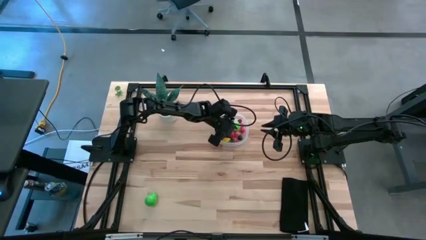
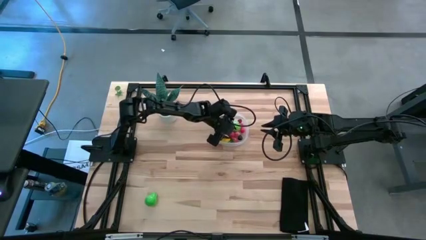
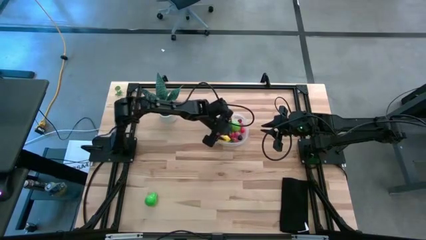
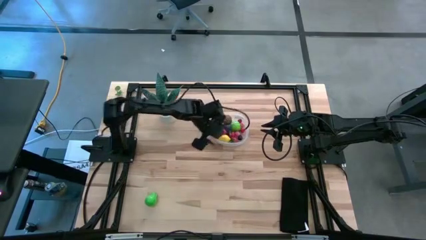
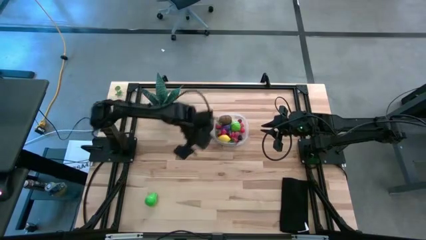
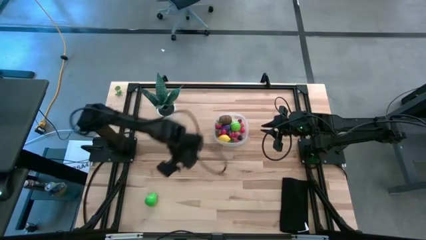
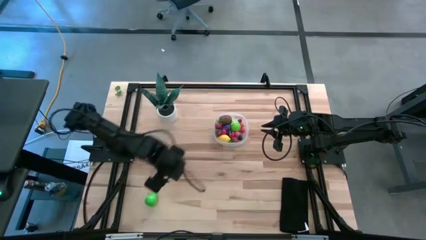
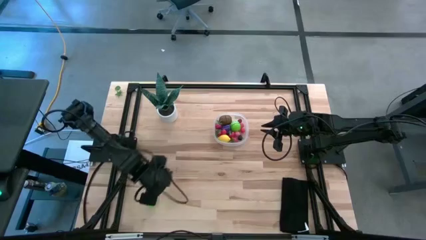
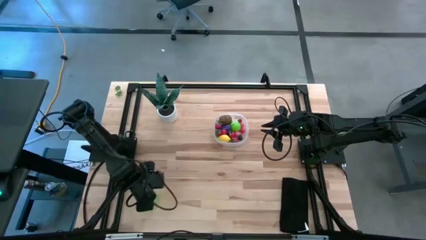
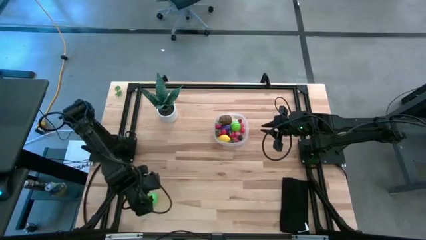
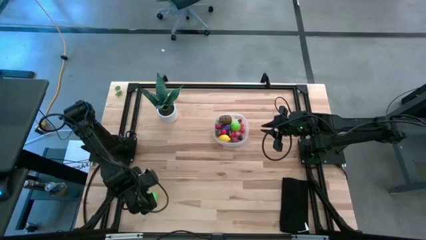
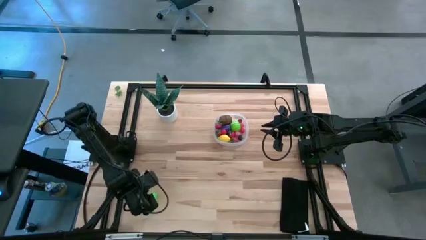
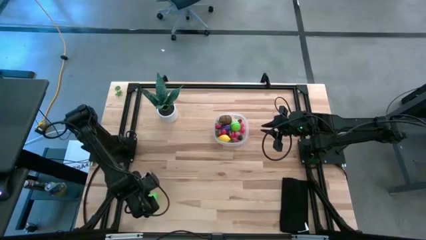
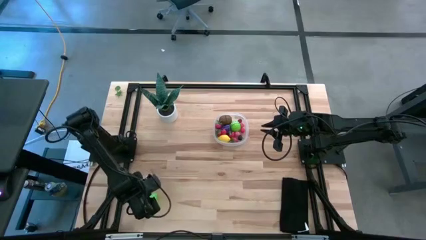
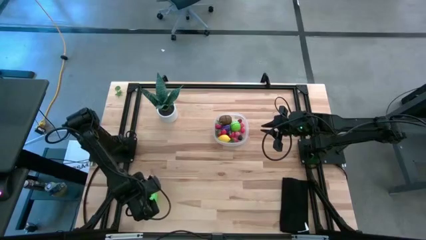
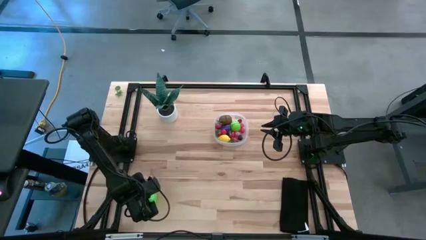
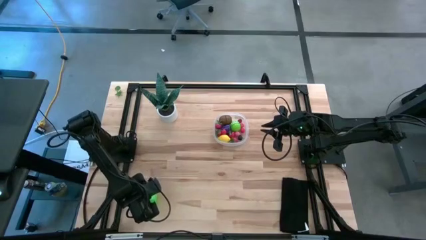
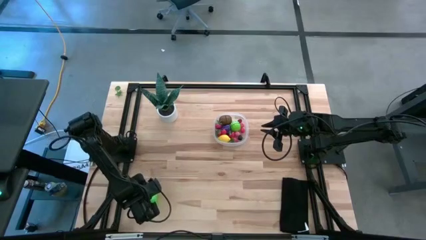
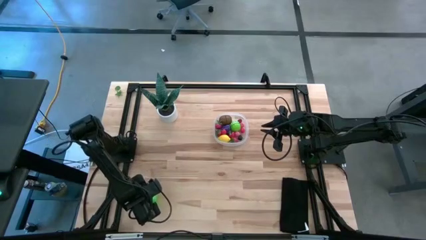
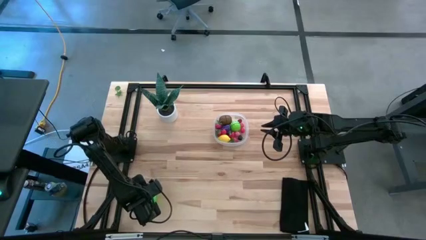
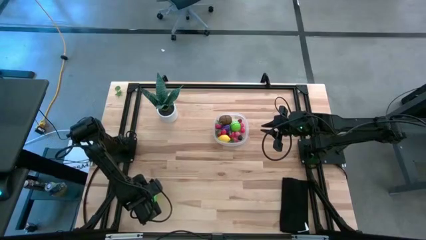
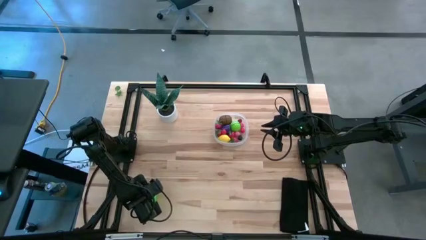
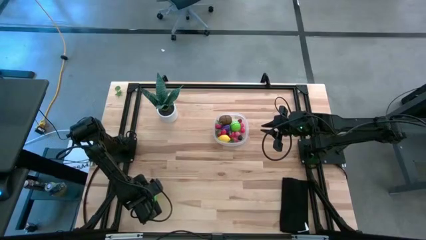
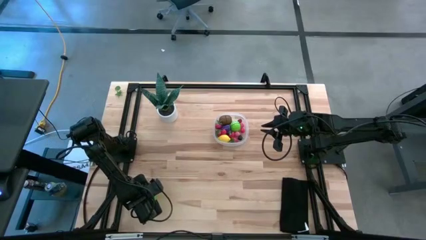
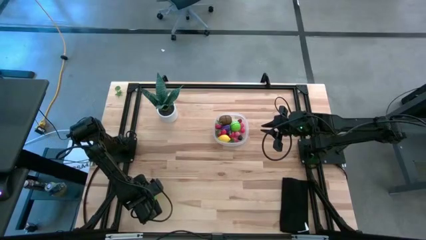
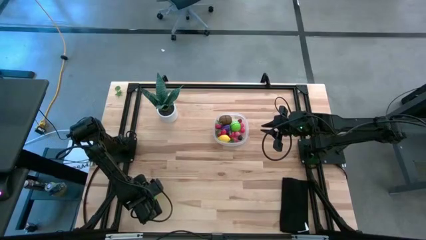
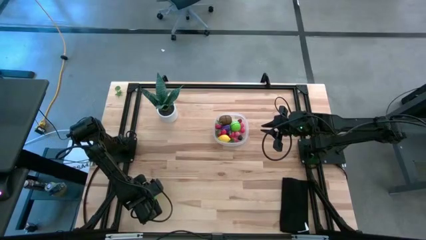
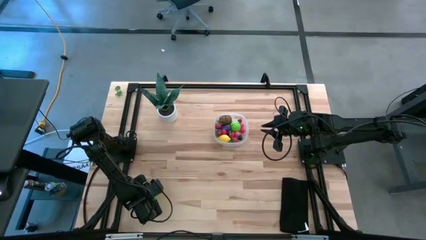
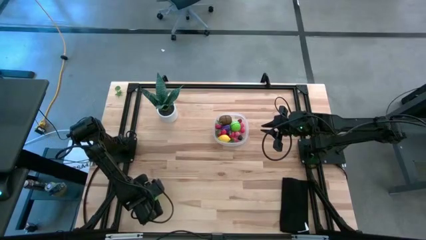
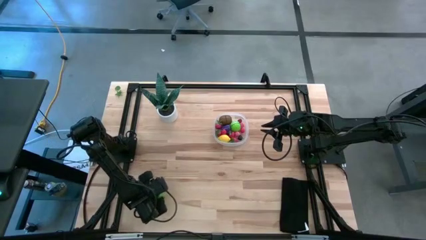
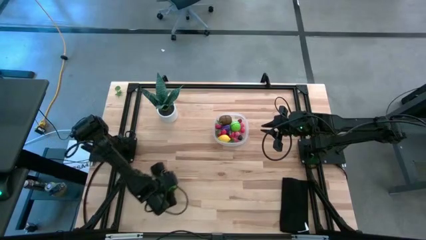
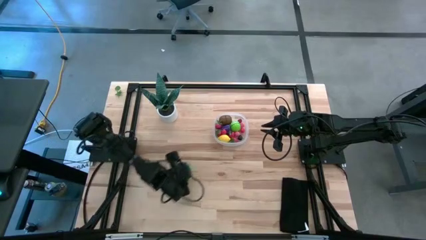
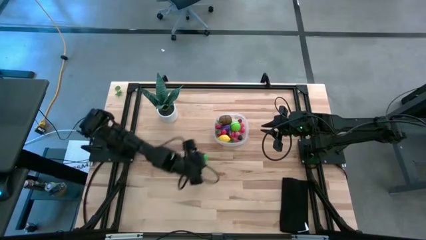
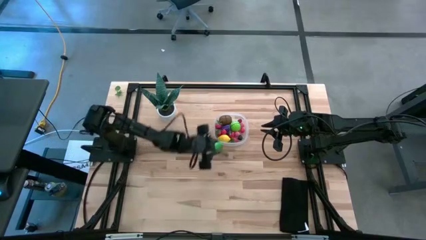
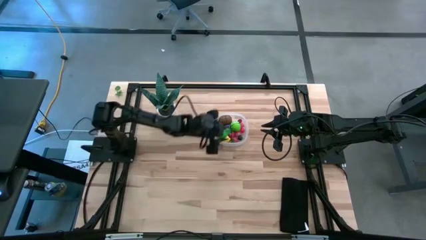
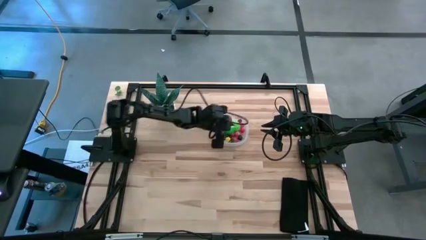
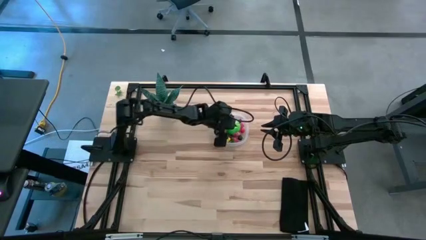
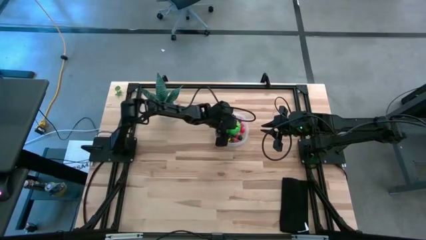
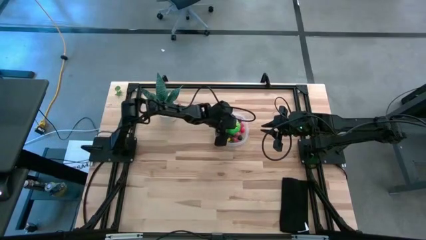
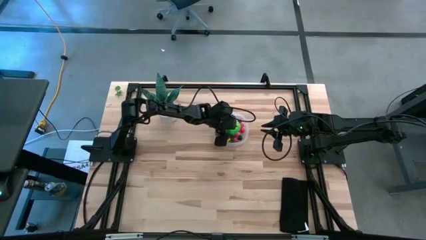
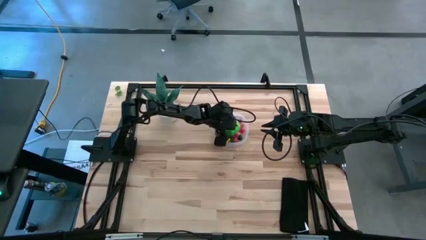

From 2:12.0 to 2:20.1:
Task: Pick and placing Produce into tupperware
Put the avocado into the transparent bin

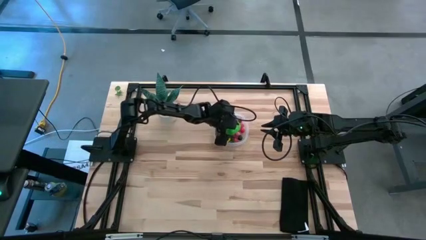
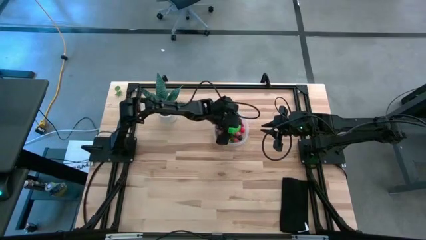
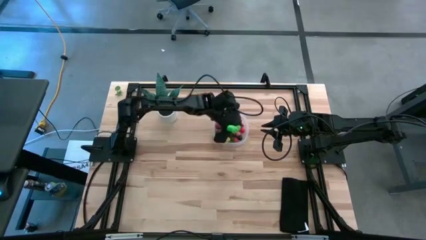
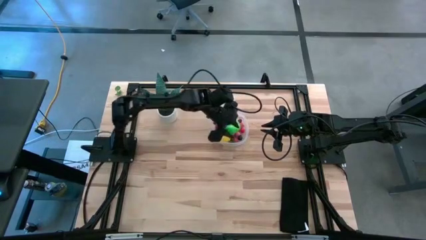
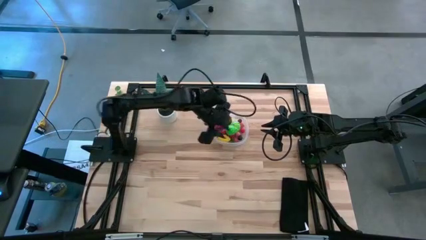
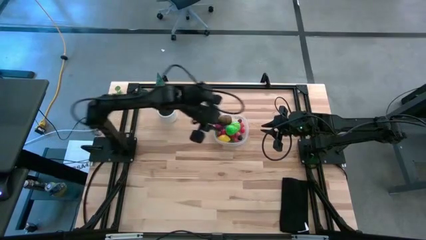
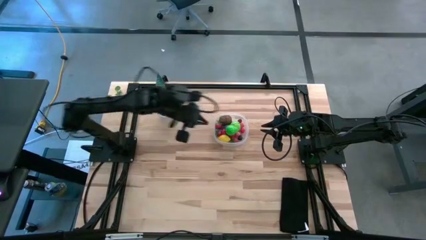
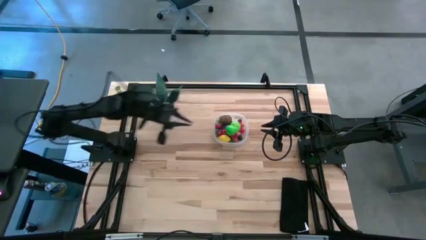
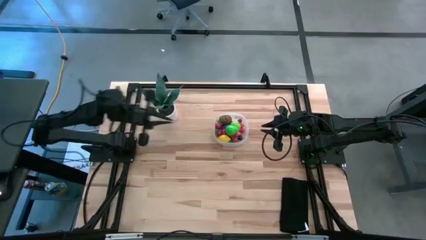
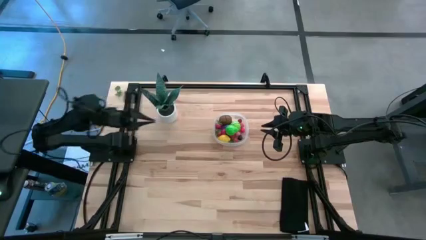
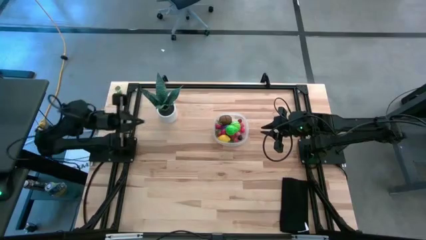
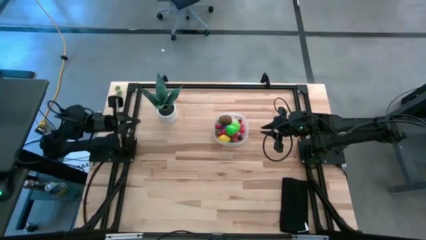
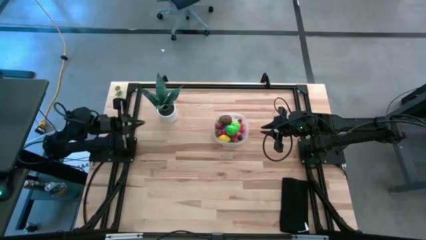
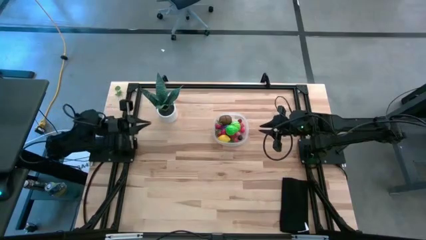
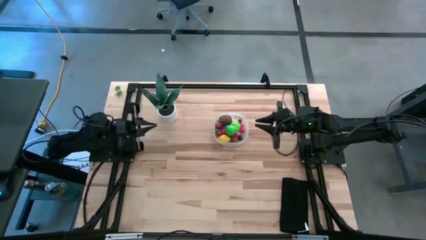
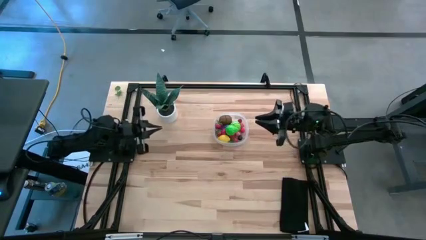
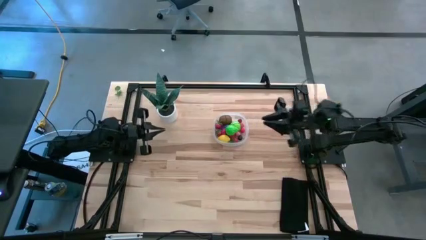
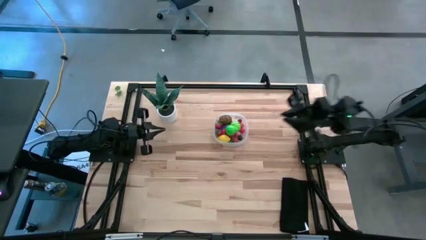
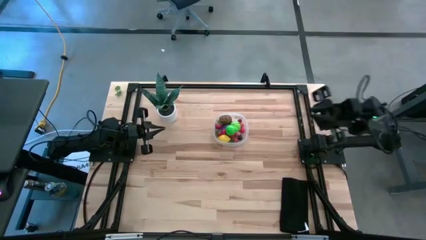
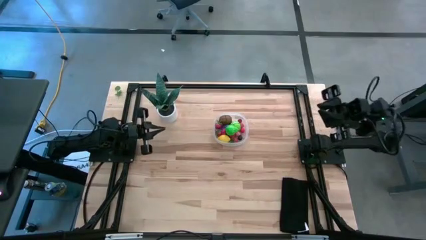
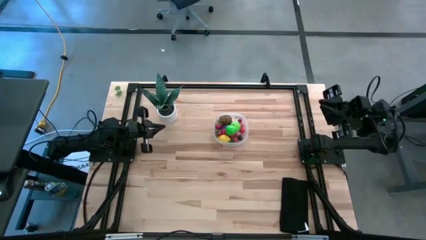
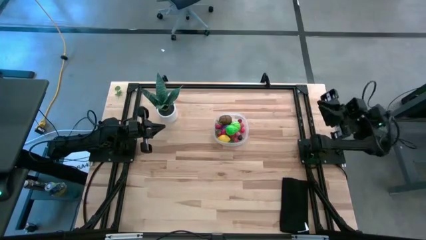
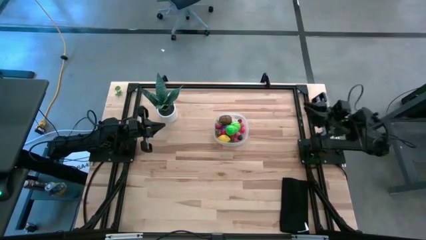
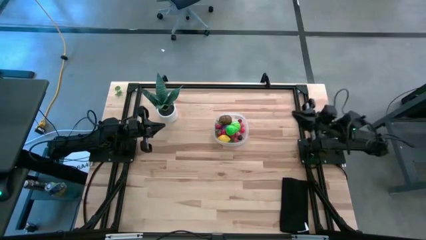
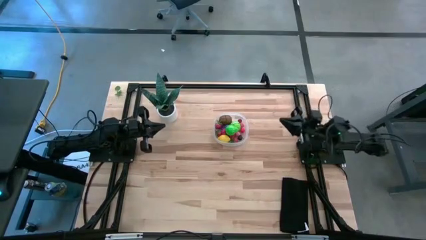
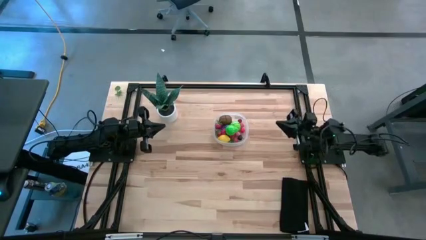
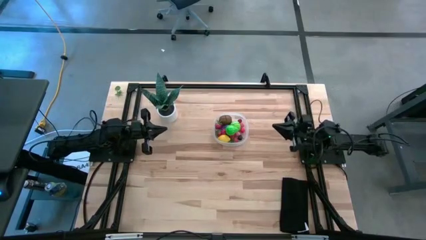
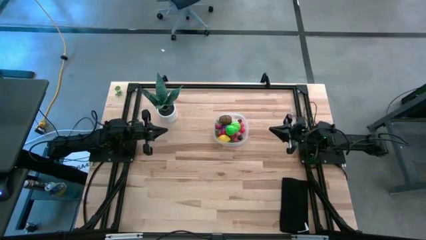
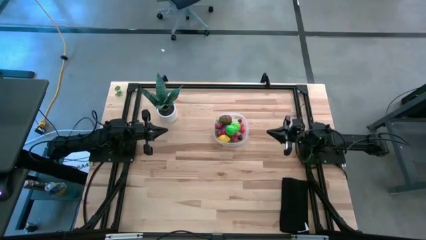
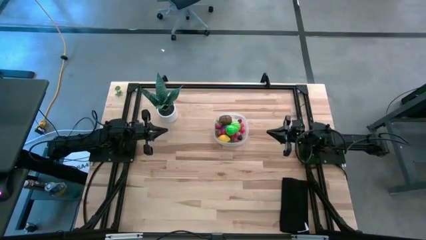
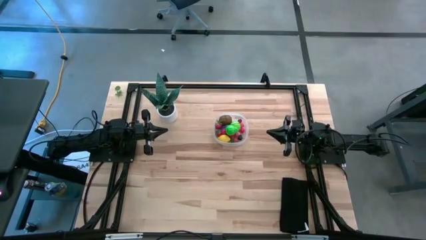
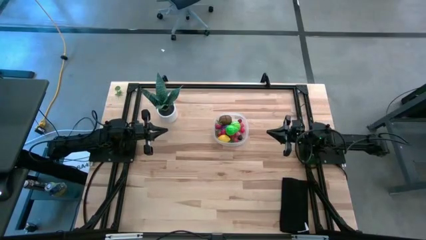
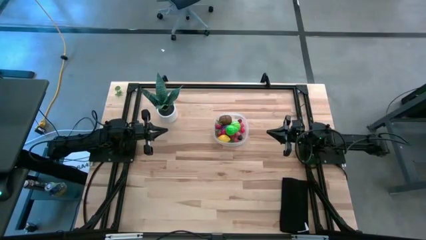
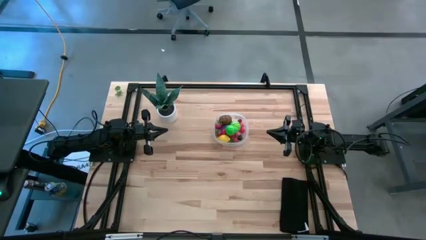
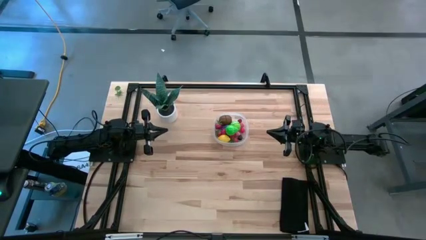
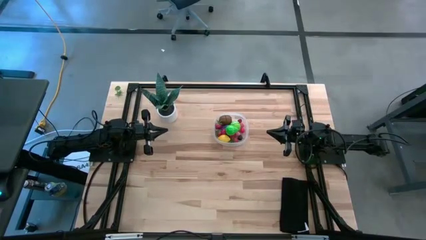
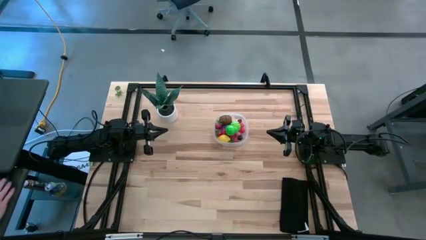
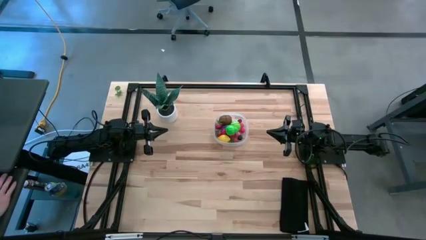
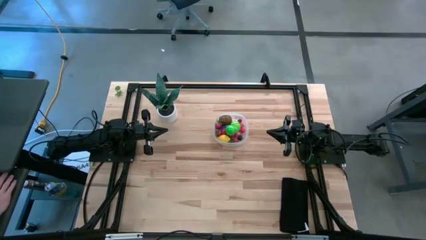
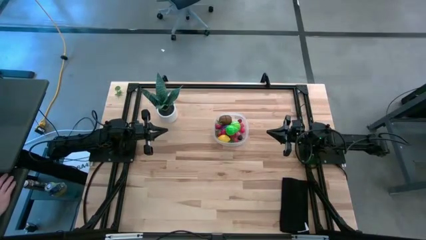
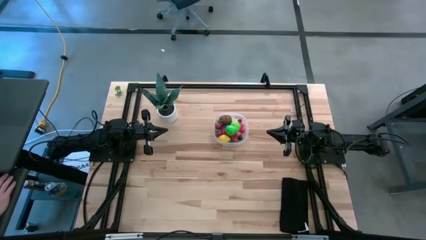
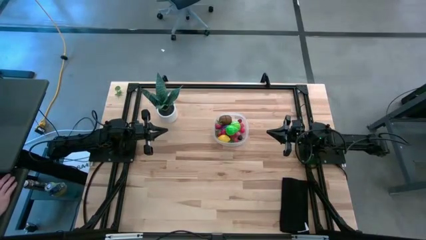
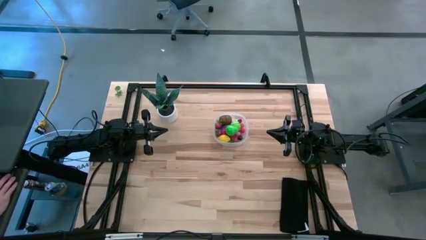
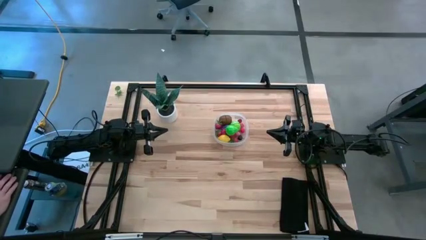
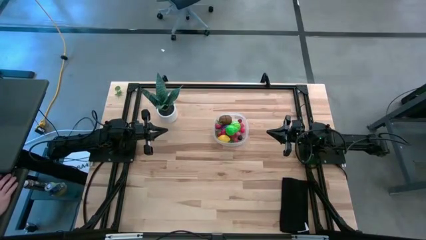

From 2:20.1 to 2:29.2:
Return to Home Position
